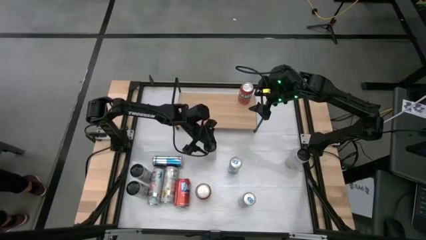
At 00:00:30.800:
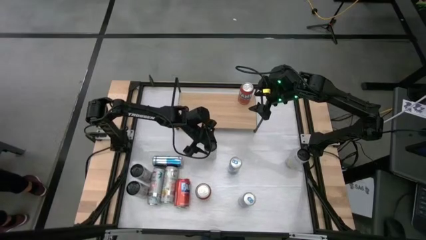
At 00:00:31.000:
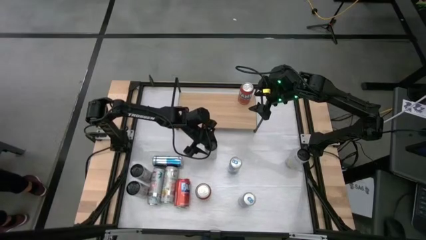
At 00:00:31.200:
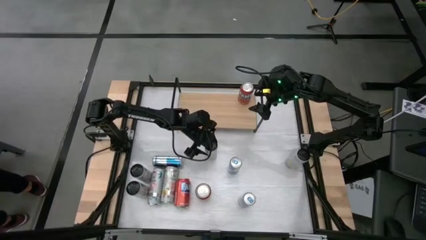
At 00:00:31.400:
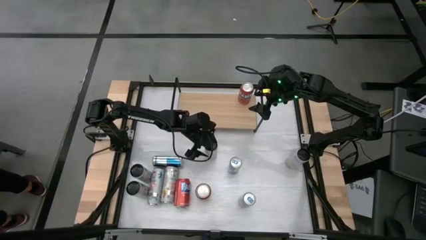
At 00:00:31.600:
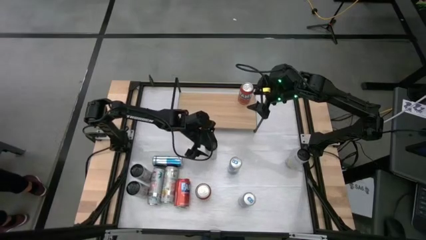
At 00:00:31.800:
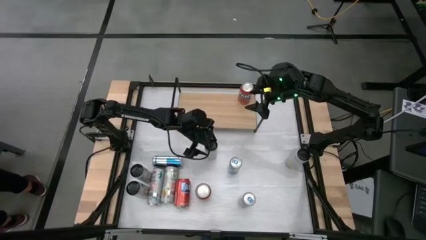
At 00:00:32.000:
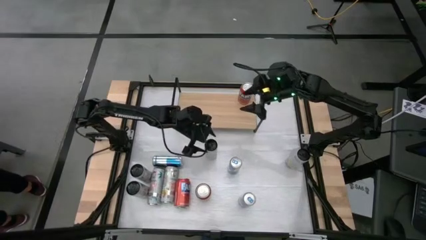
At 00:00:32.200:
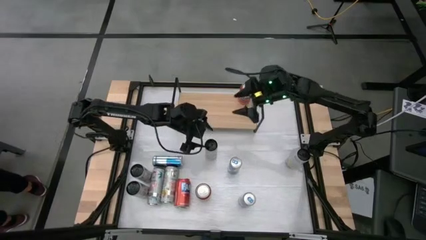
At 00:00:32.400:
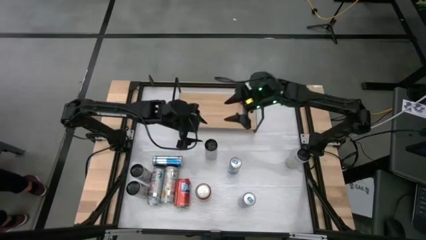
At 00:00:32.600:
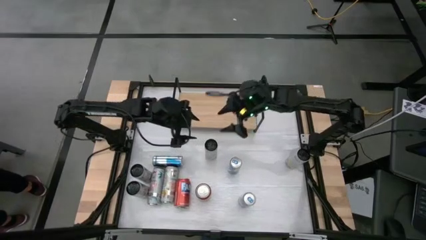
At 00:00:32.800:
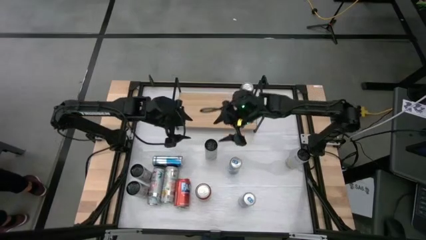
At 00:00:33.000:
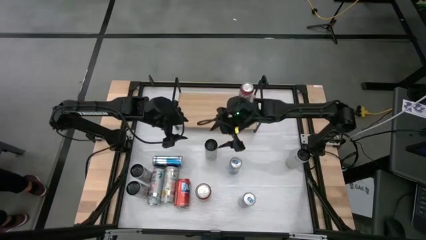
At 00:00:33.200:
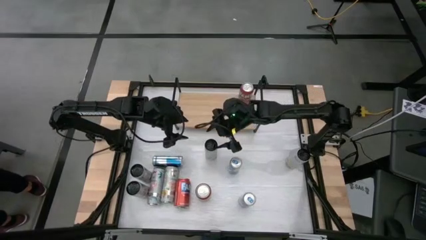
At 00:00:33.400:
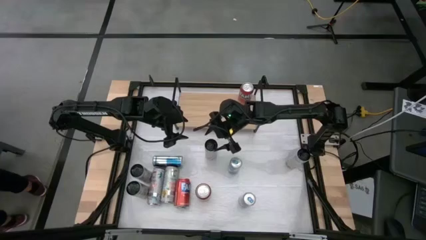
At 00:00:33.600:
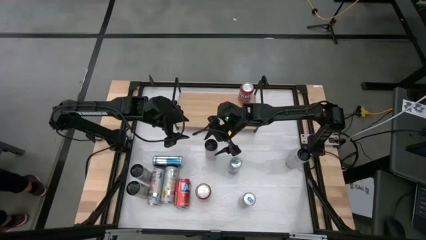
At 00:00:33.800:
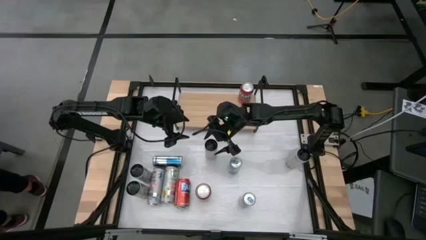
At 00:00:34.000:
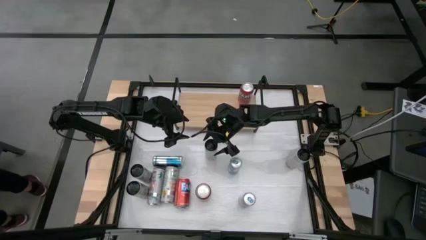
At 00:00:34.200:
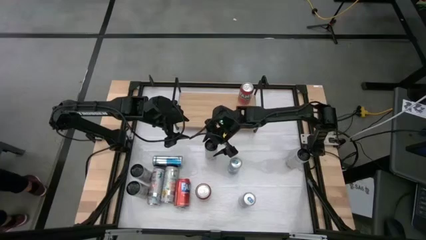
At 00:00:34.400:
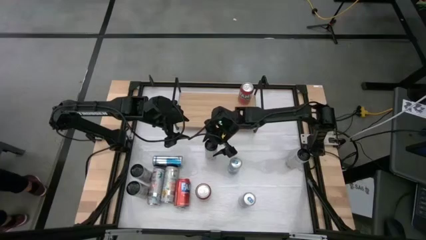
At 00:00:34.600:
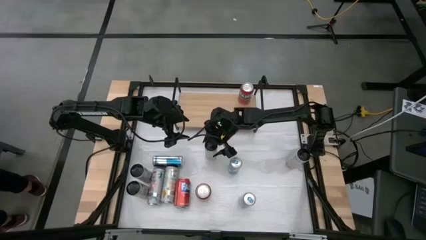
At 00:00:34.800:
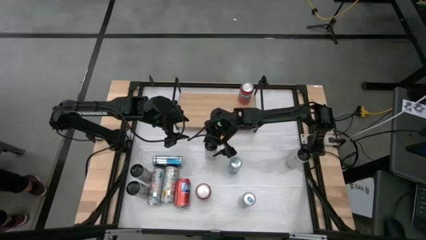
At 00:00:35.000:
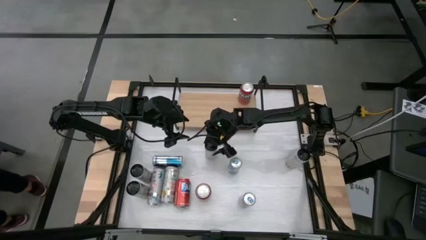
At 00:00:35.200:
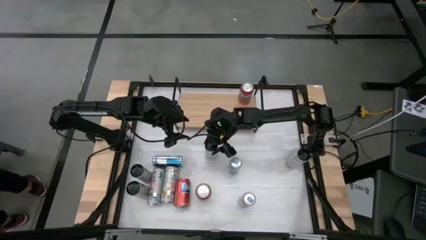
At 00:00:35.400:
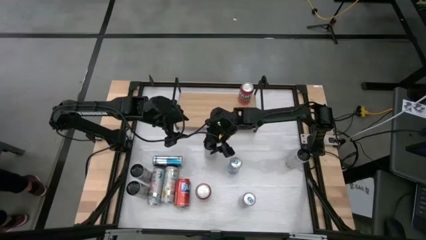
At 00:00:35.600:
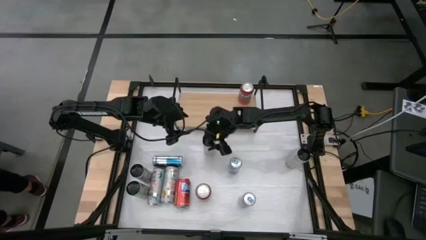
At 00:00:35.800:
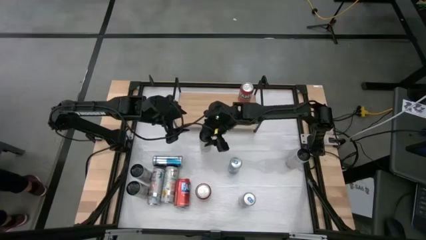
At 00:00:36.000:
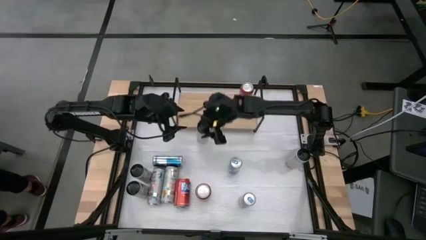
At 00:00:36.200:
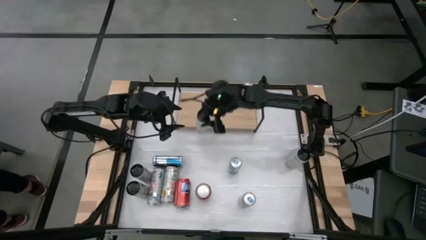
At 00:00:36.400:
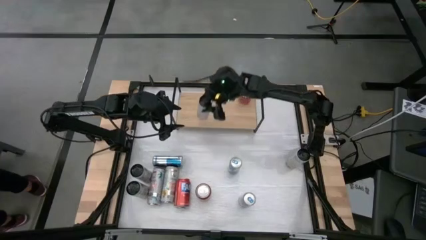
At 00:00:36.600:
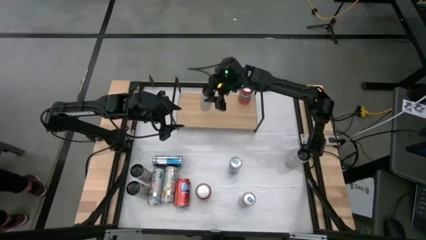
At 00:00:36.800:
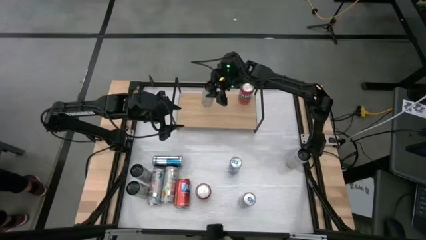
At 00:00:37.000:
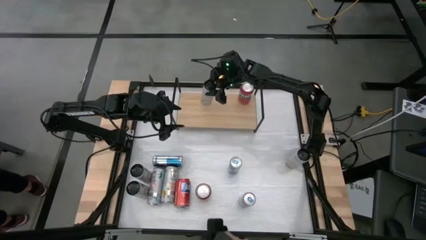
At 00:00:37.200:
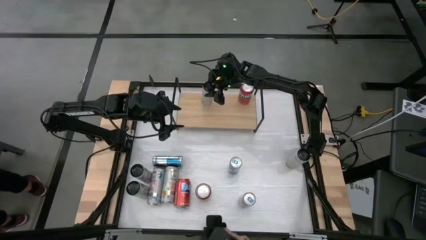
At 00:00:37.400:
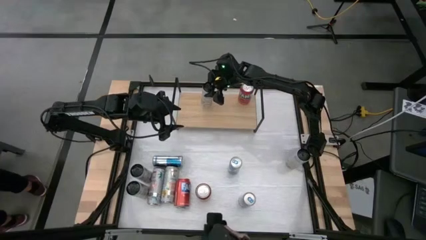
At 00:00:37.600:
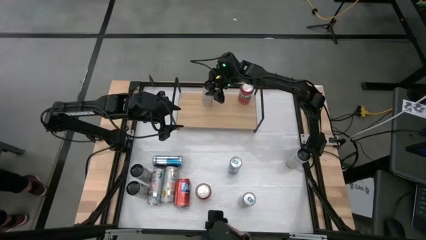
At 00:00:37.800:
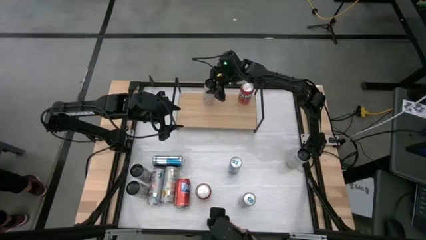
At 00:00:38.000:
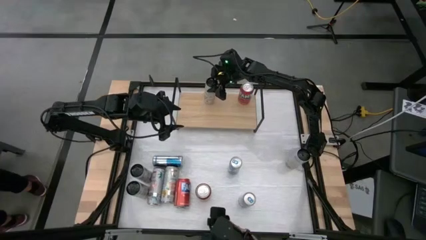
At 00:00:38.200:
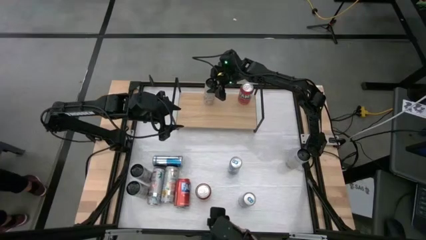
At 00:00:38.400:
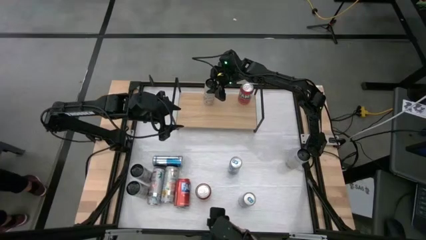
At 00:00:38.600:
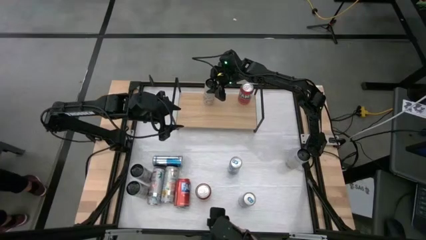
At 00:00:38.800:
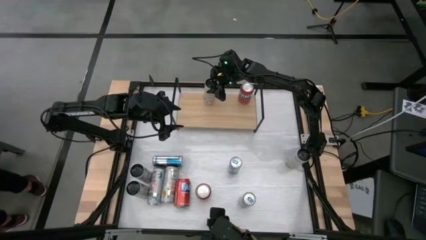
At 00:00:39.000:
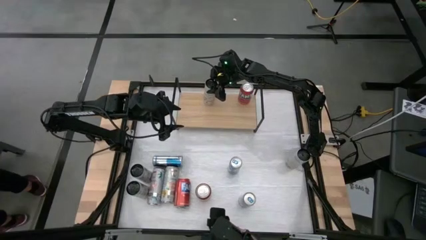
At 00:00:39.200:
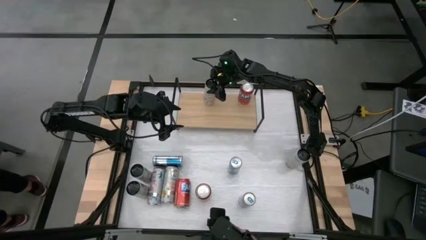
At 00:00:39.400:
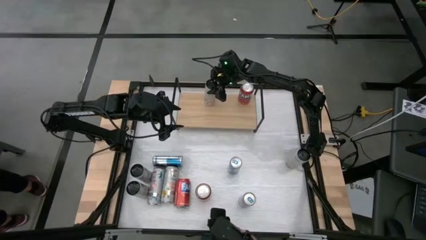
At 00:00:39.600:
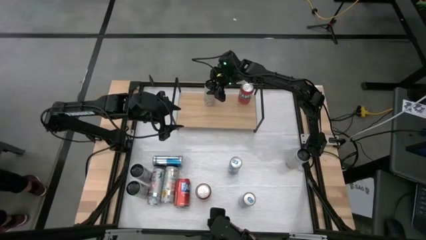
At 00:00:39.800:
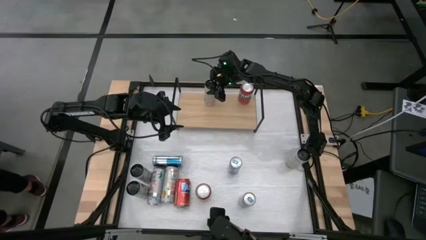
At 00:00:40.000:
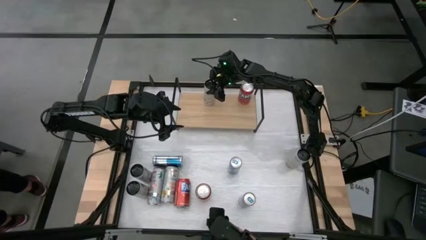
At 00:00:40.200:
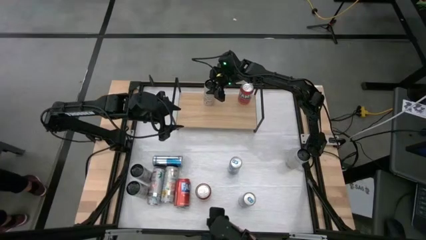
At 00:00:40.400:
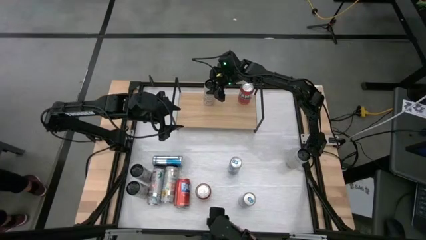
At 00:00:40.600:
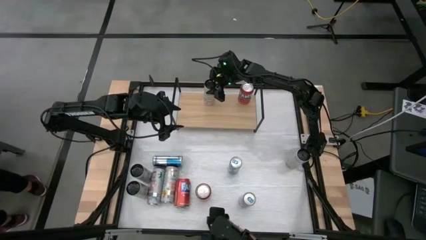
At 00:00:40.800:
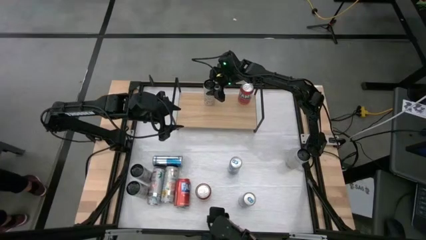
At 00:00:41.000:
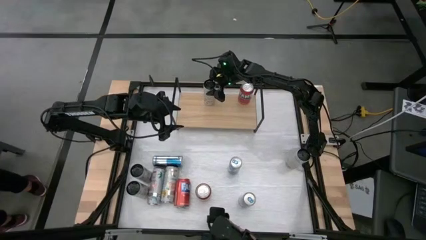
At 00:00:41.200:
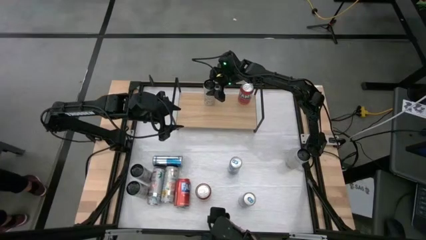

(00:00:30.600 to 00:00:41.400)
Task: Place canned beverage on shelf
Put the top left white yellow soda can on the shelf
